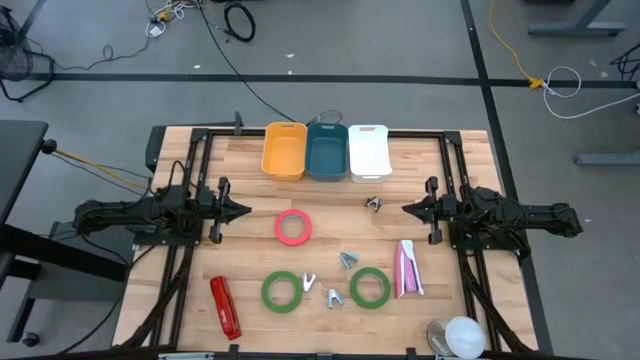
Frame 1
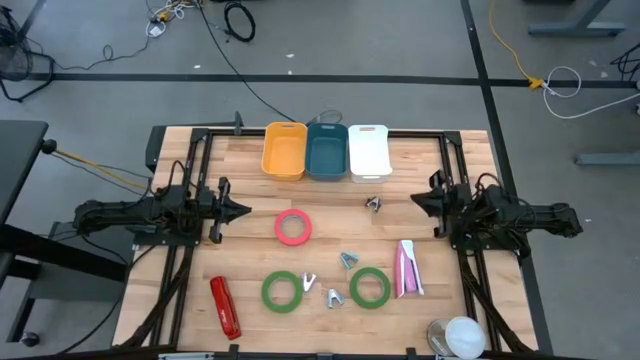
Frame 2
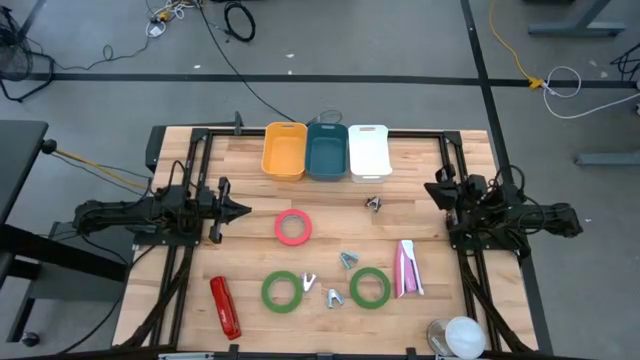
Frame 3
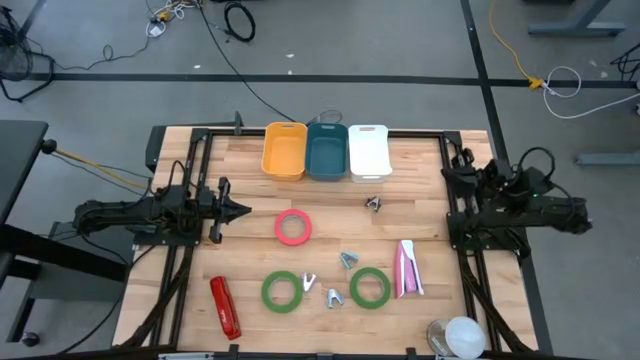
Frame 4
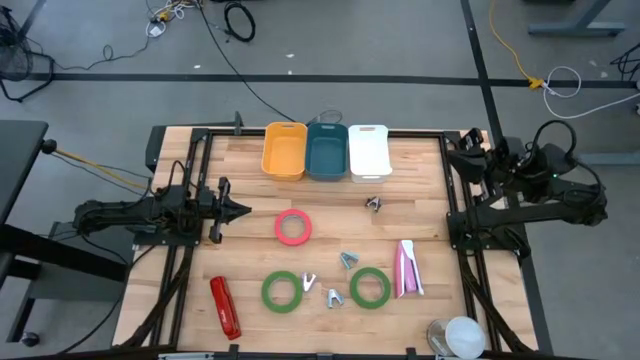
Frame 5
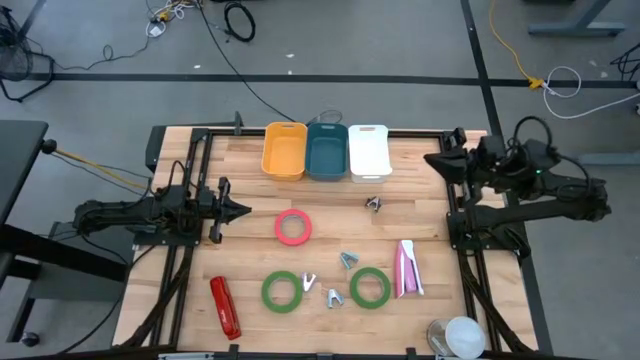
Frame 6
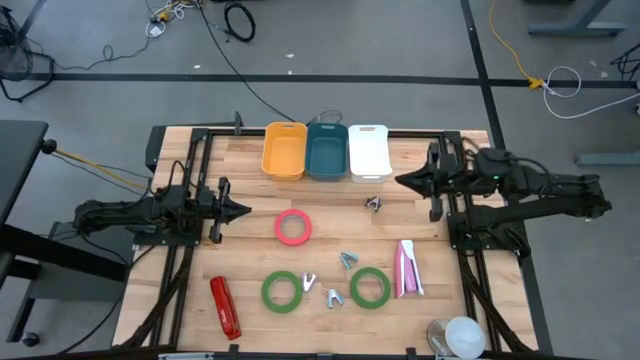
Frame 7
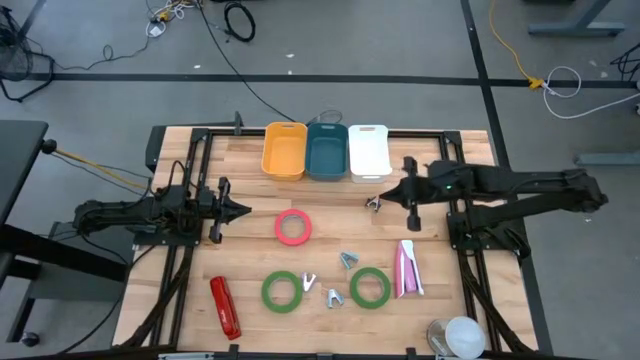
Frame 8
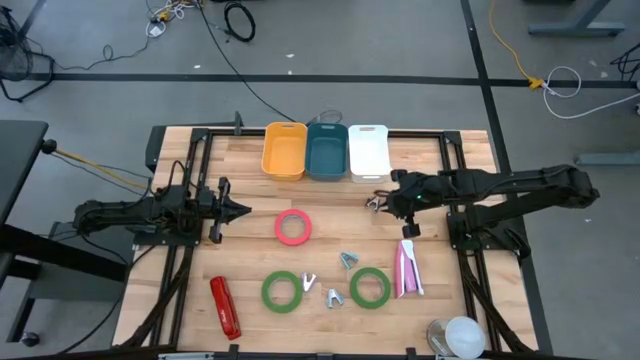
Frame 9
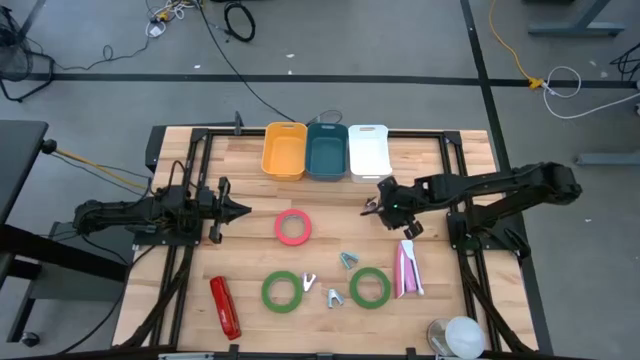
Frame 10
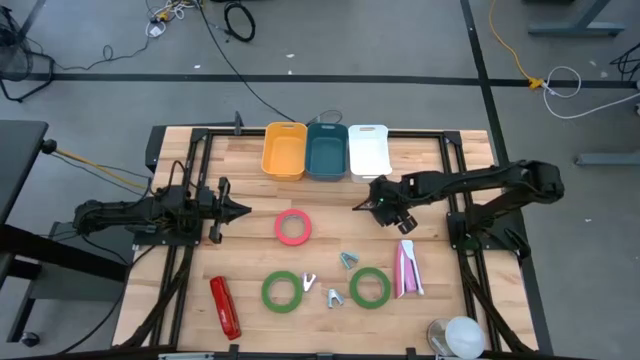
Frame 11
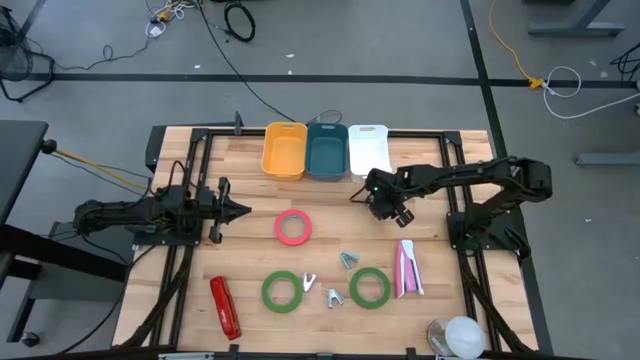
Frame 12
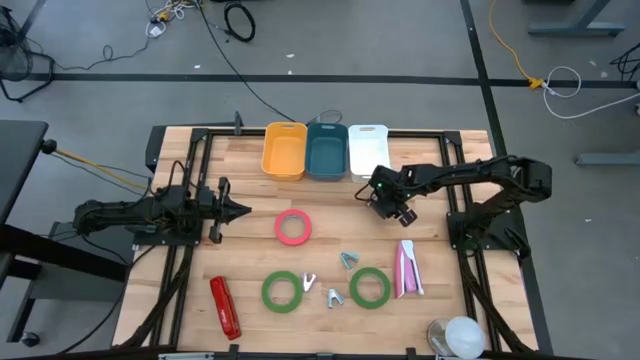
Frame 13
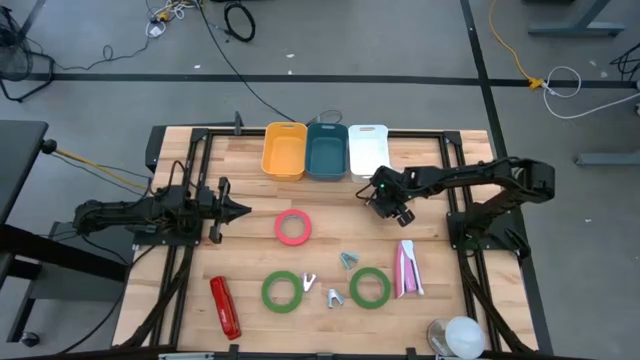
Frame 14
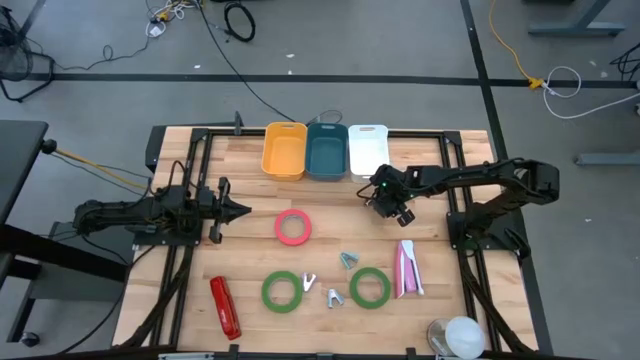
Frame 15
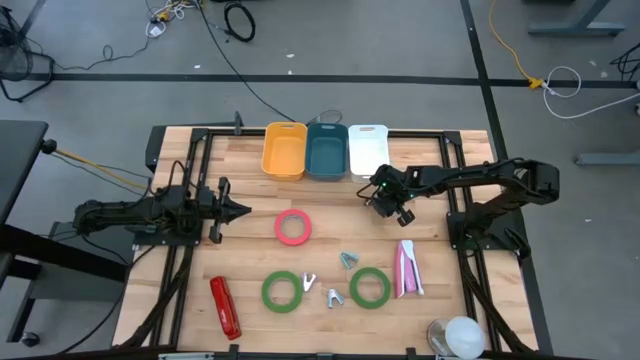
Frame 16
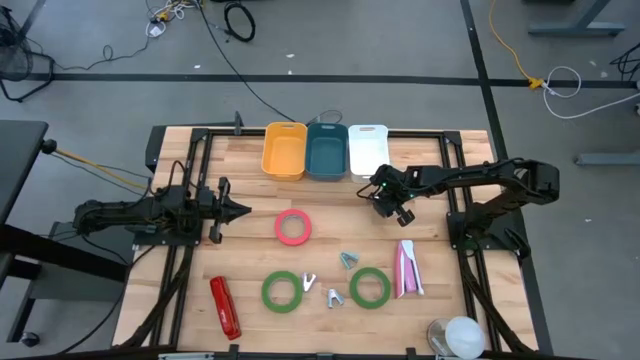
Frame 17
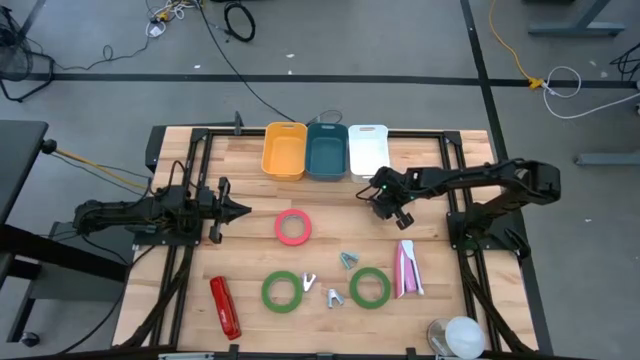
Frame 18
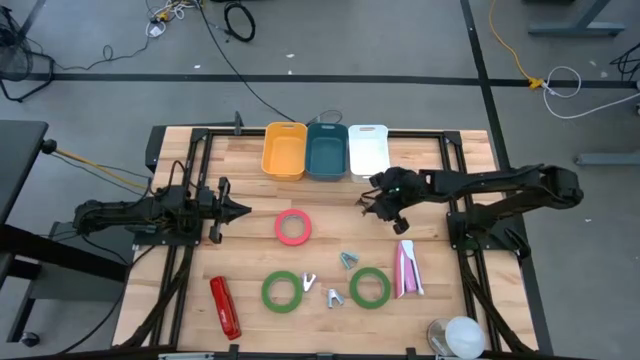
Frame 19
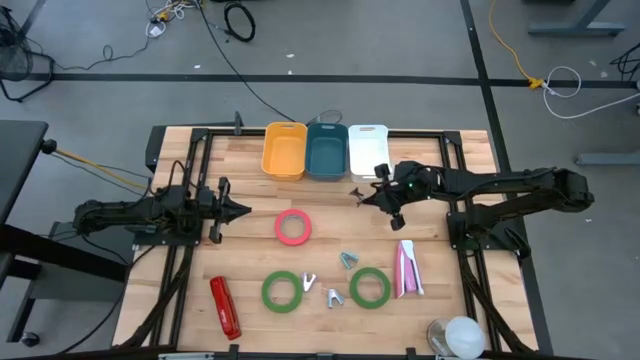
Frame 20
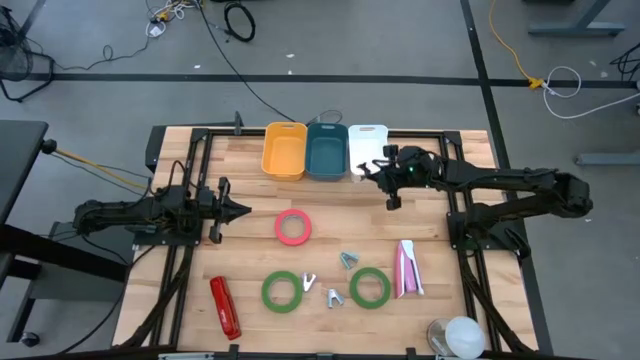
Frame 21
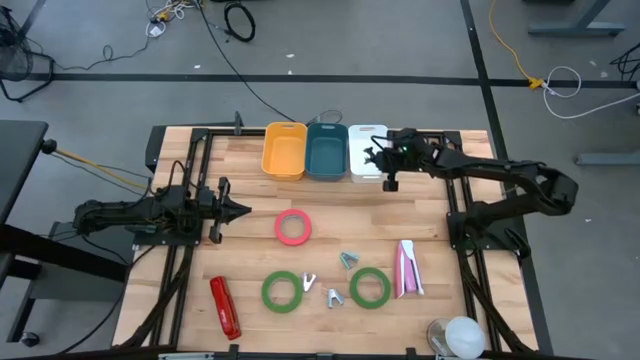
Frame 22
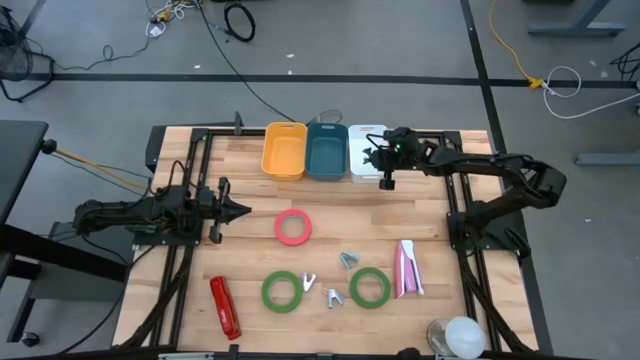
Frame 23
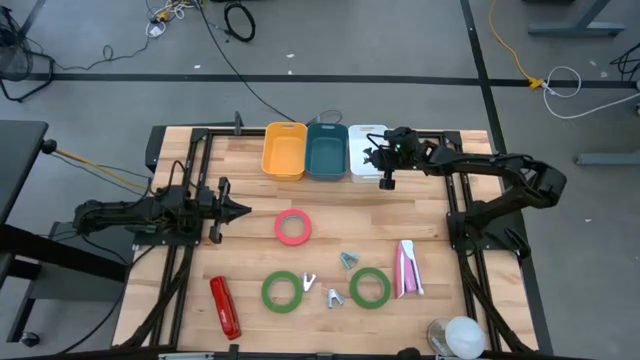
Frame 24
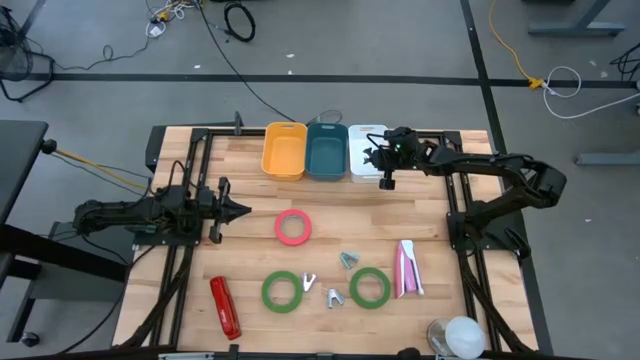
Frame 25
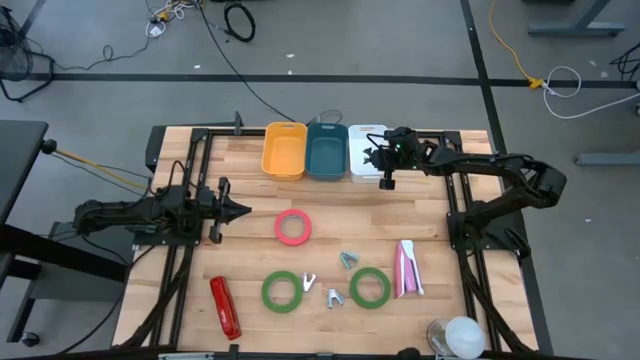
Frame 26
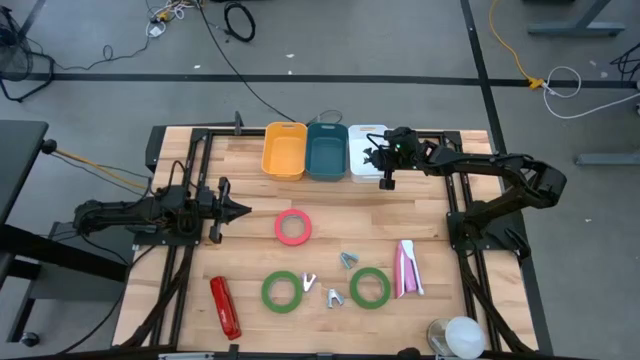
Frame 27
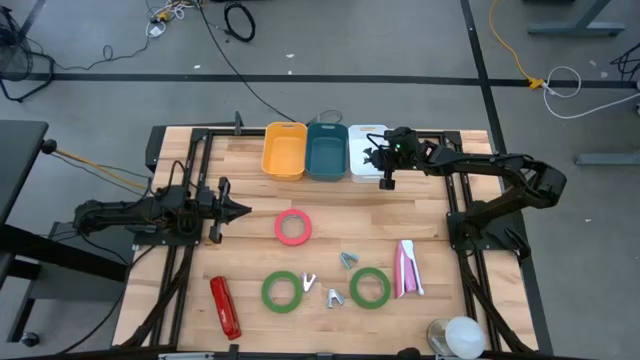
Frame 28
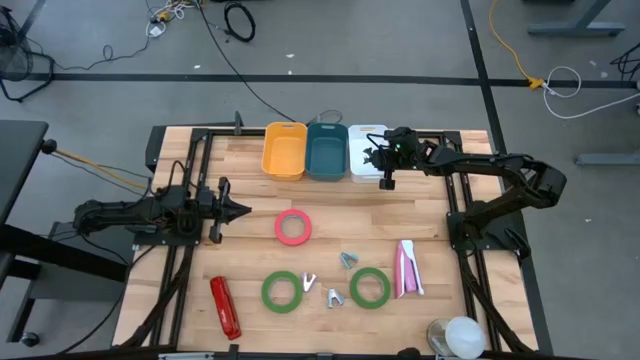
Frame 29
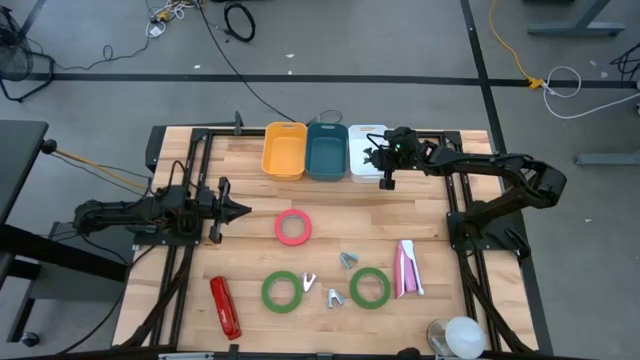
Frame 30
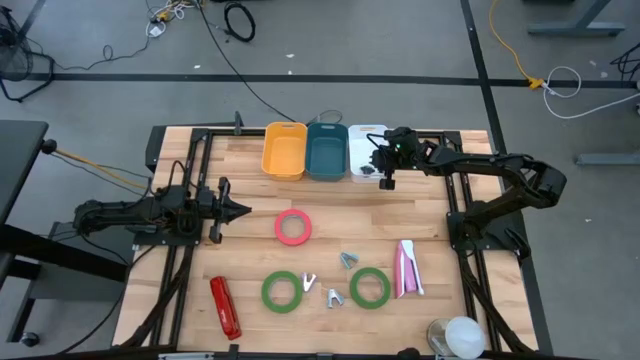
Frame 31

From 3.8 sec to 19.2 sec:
Task: Pick and place Stapler, Stapler remover, tape
Put the black staple remover into the white bin

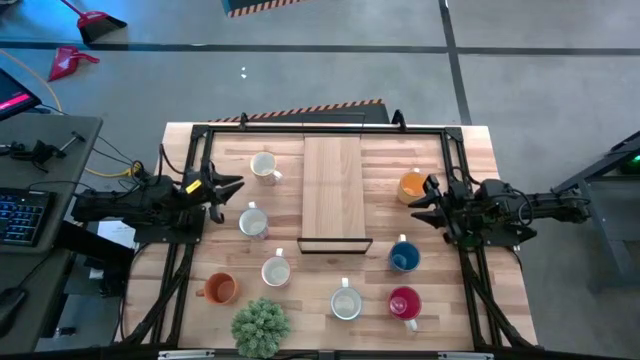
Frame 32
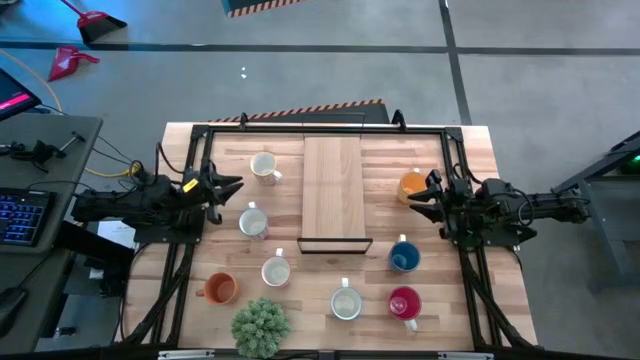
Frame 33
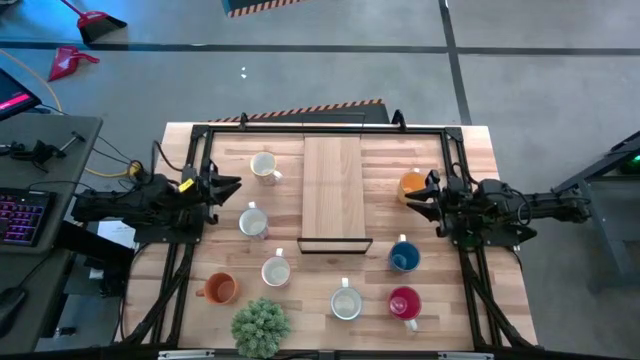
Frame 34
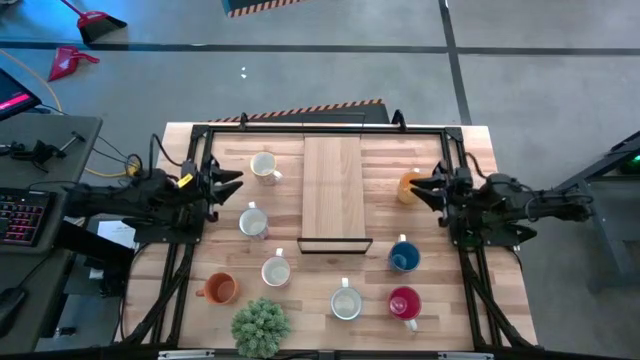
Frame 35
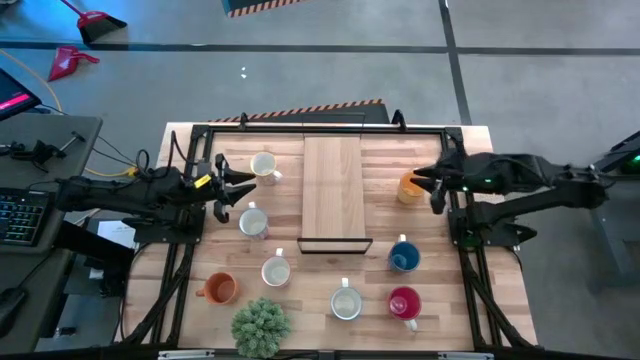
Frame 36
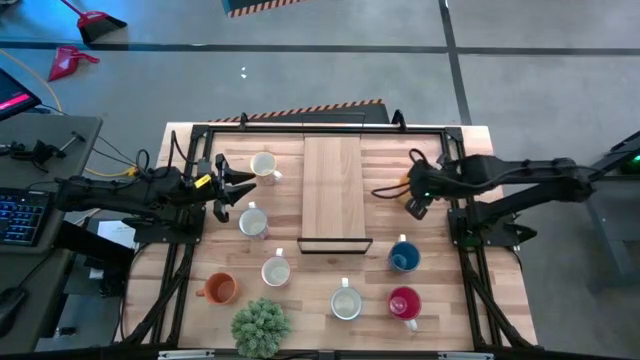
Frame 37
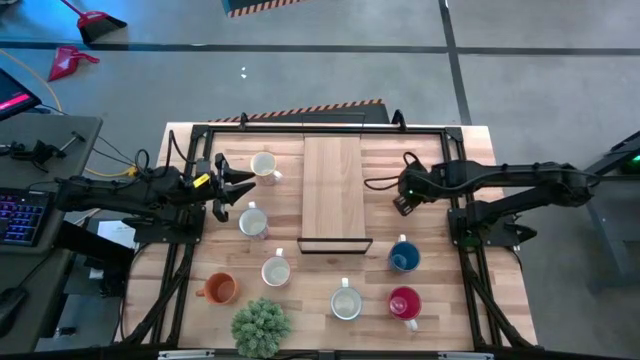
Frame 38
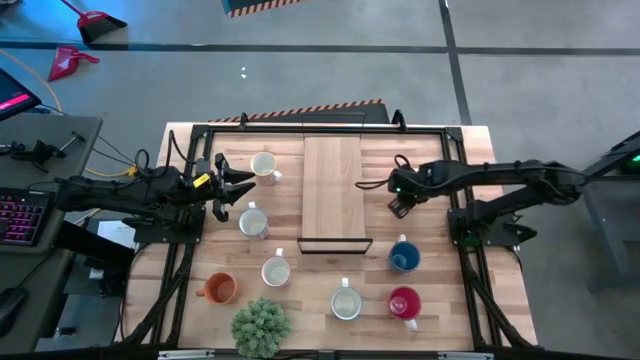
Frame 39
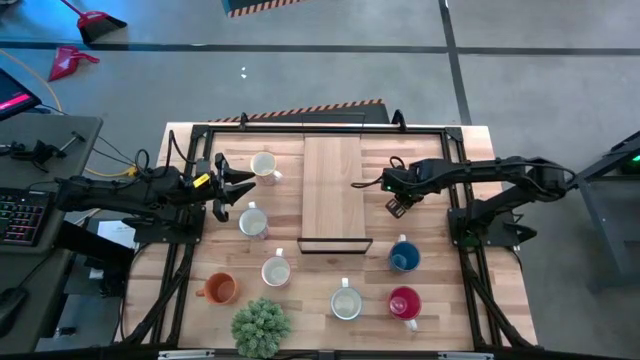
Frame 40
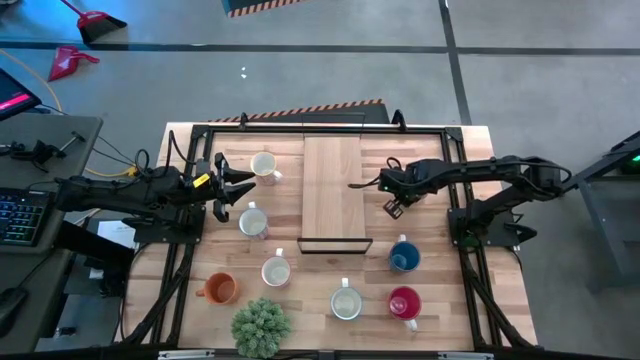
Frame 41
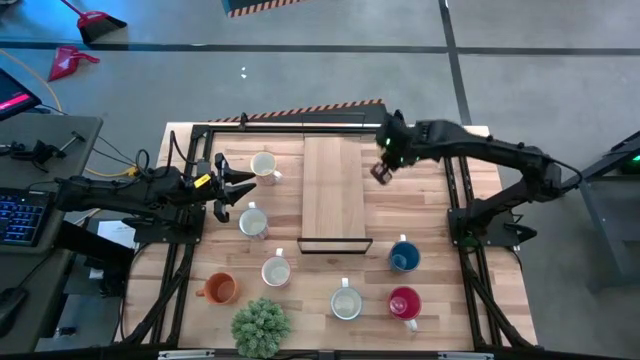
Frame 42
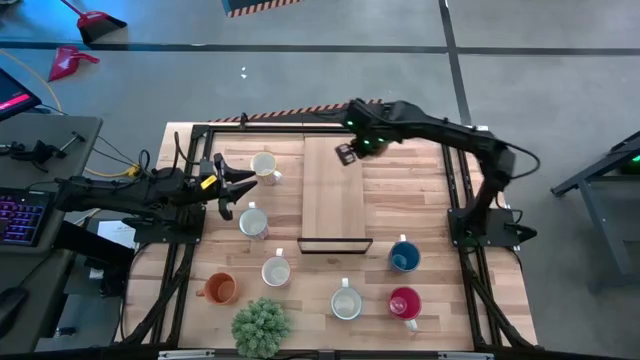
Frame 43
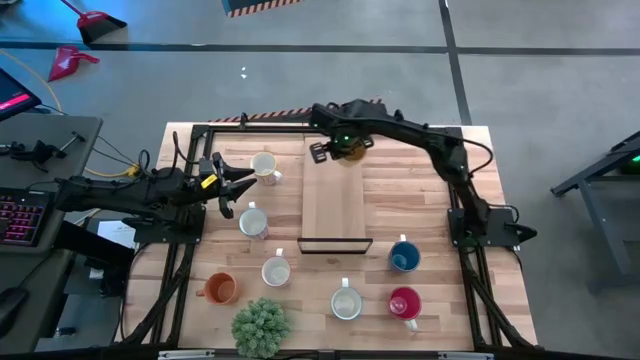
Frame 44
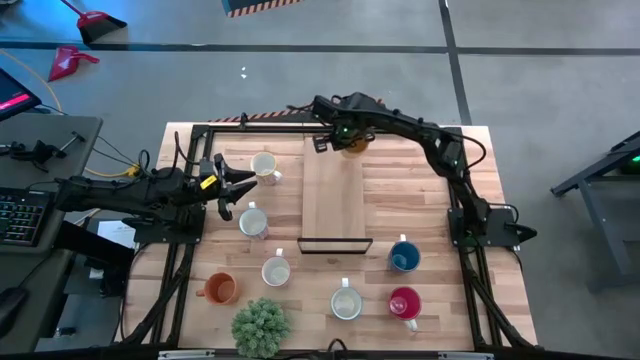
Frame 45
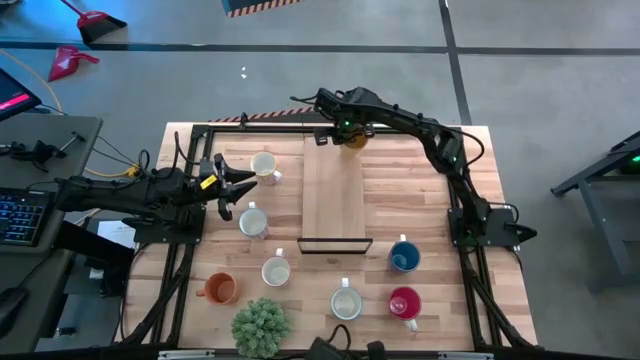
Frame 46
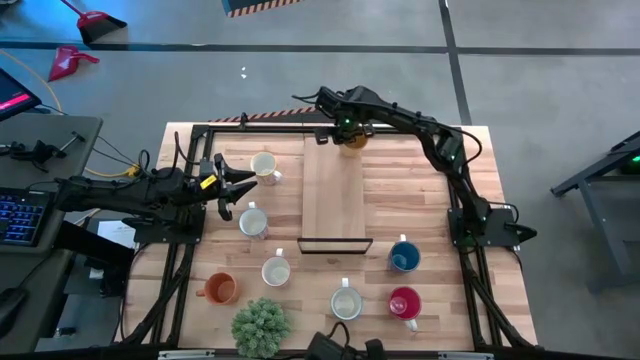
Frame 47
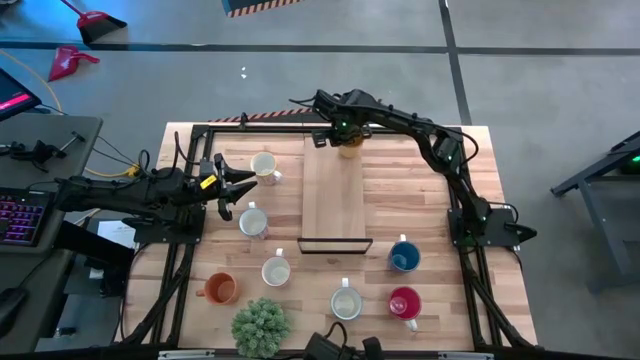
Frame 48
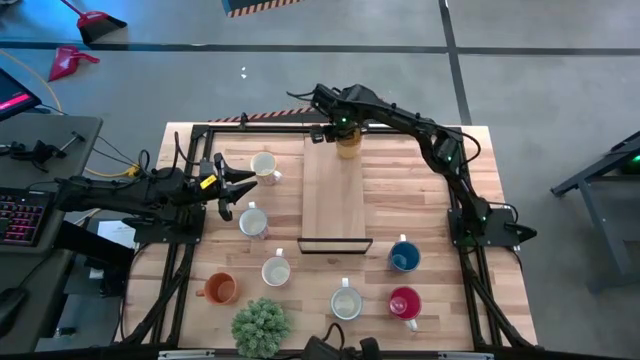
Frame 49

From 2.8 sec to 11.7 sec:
Task: Place coffee mugs
Put the yellow cup on the shelf
